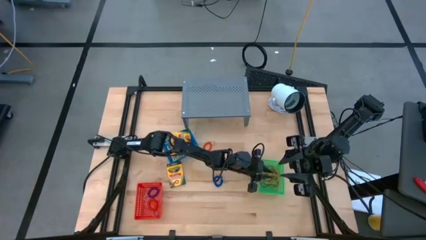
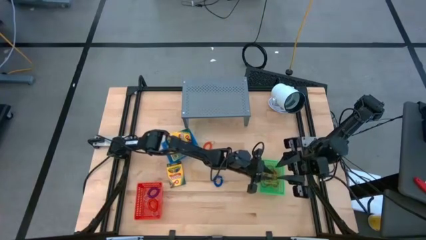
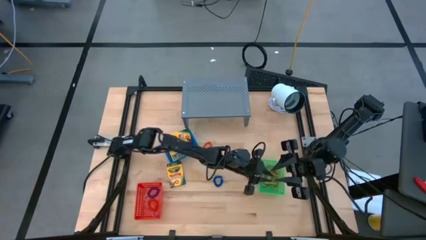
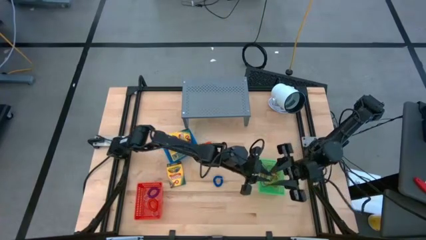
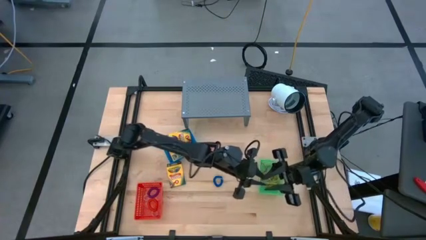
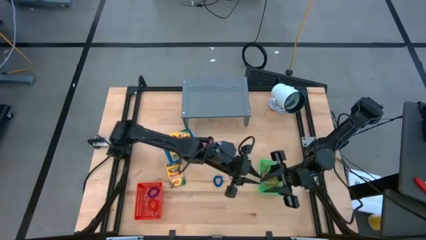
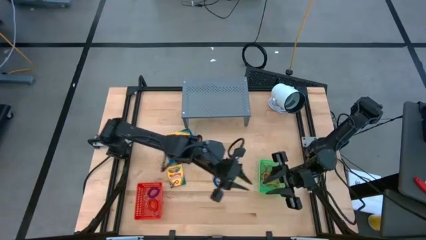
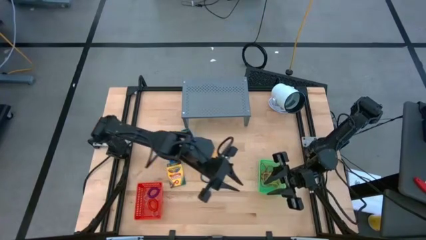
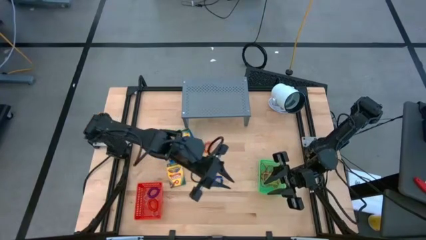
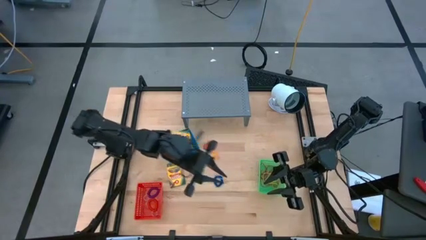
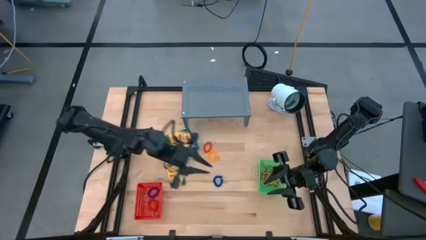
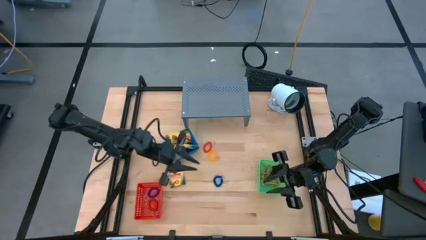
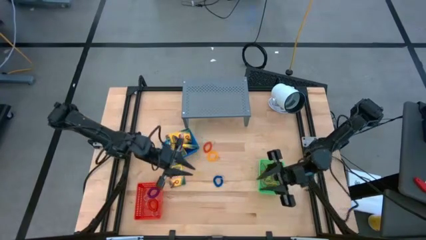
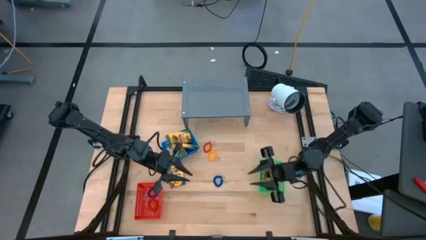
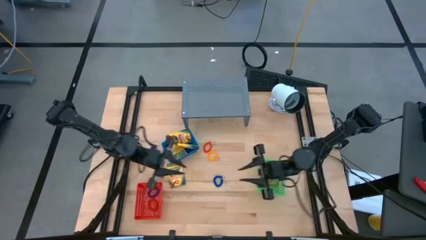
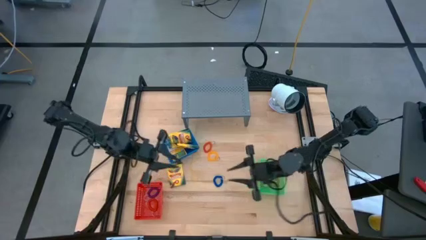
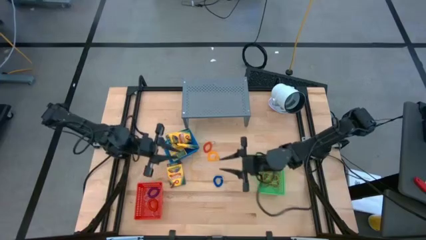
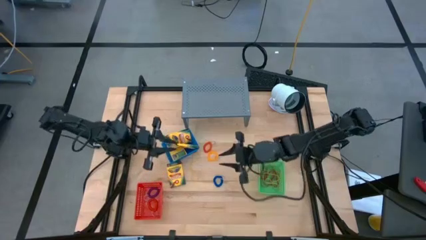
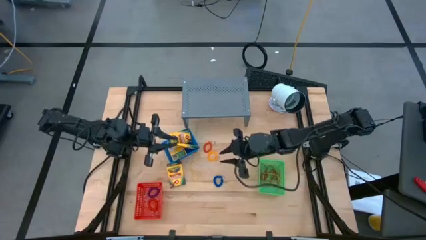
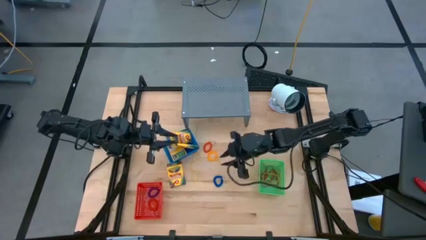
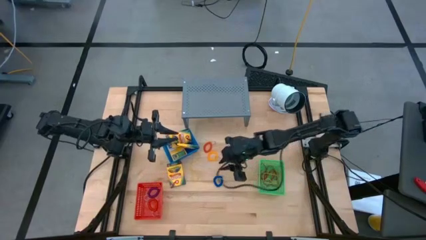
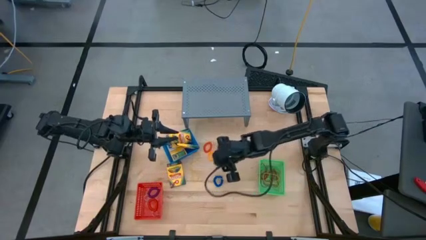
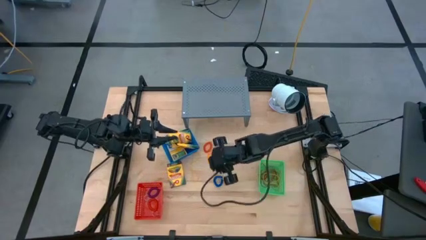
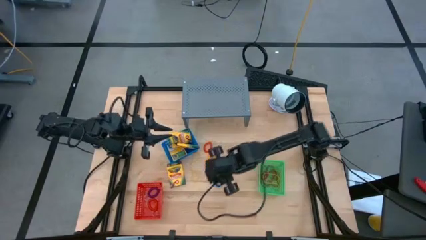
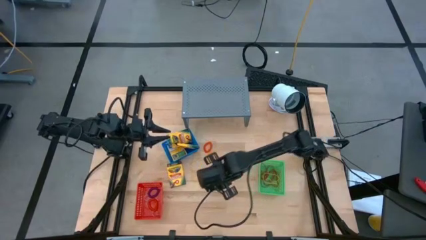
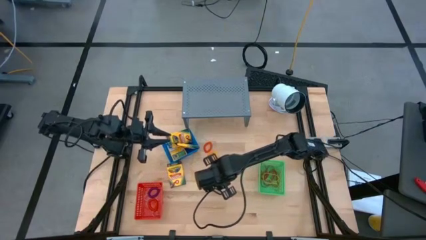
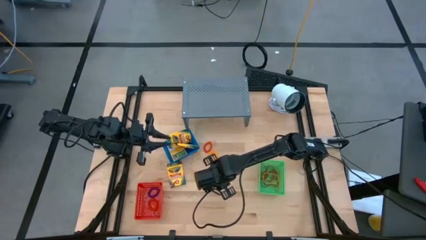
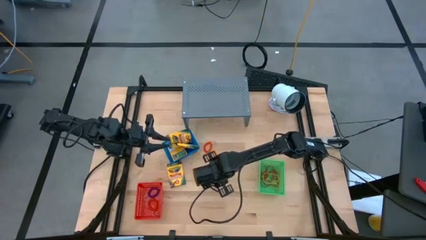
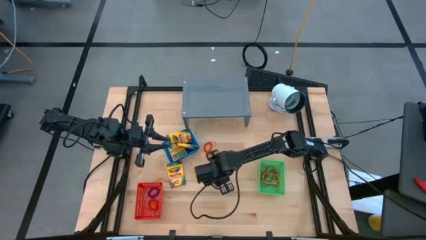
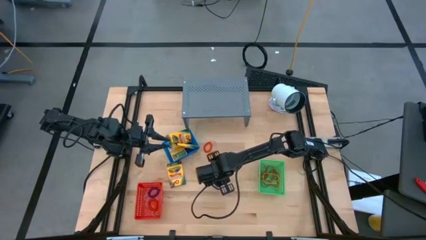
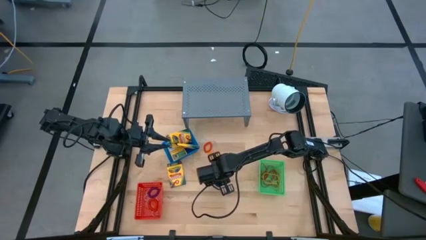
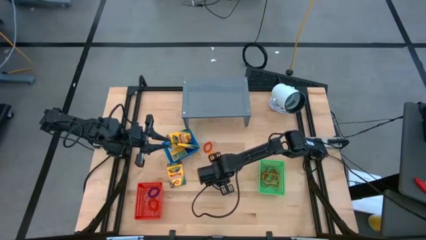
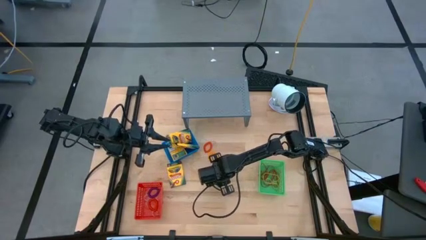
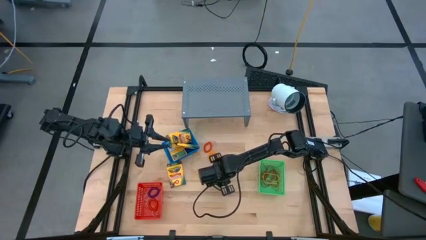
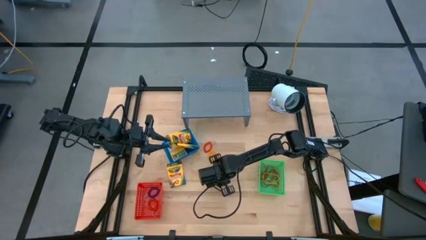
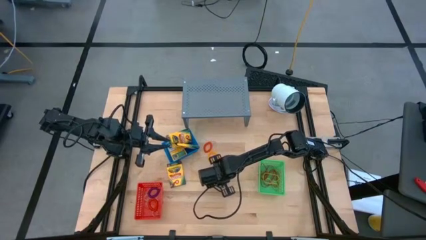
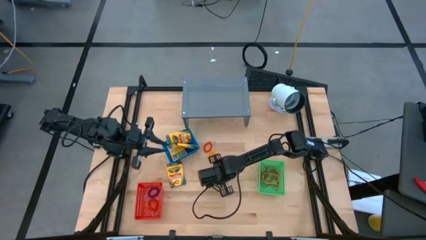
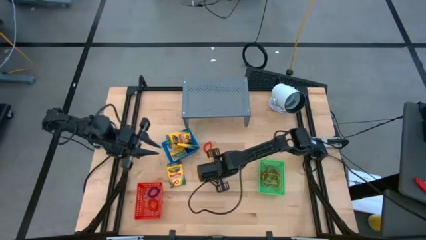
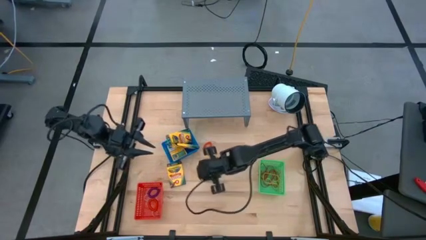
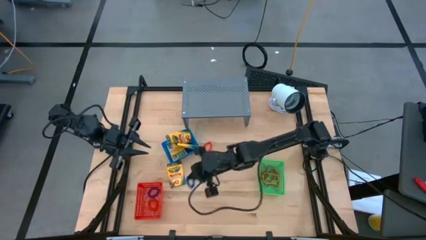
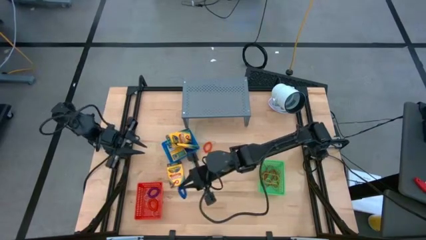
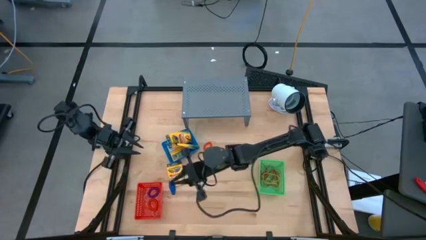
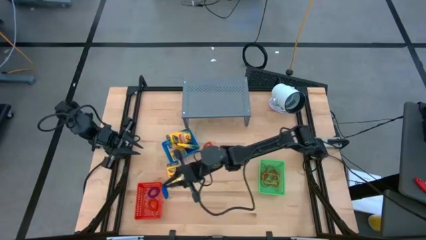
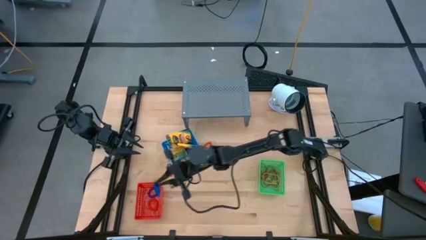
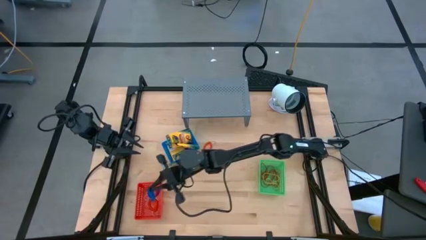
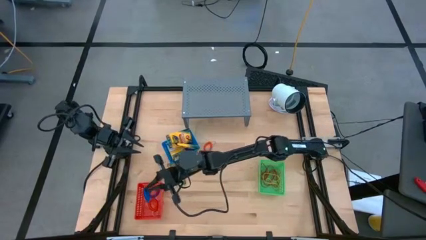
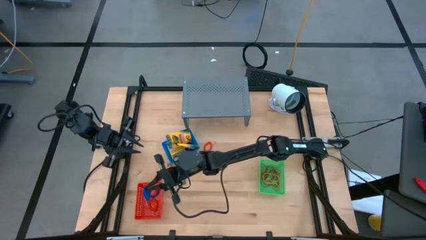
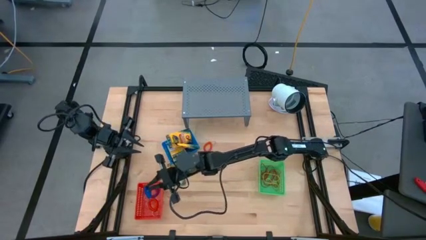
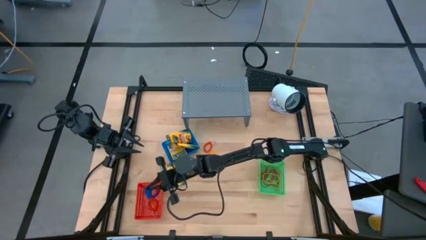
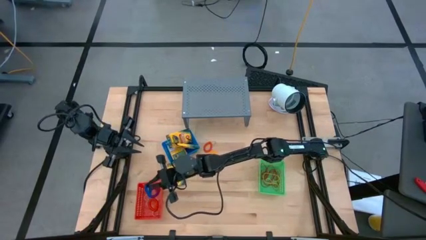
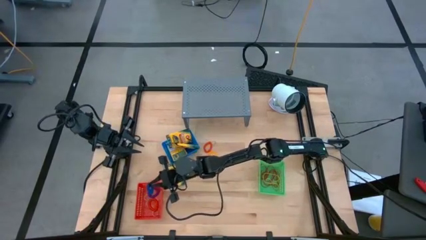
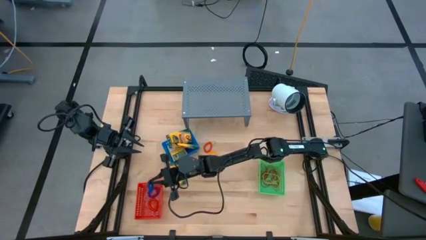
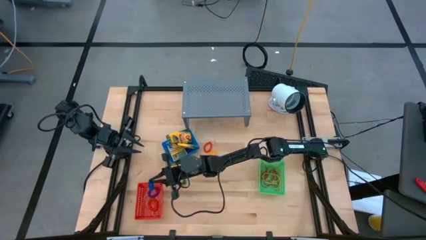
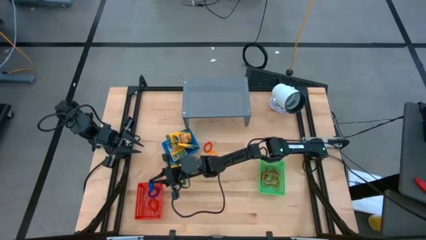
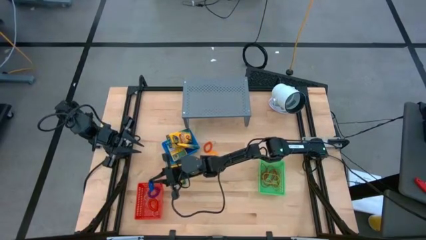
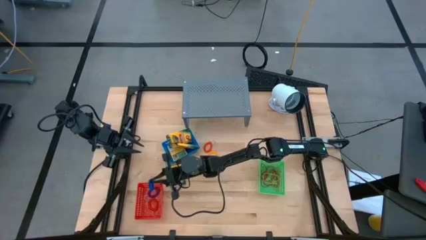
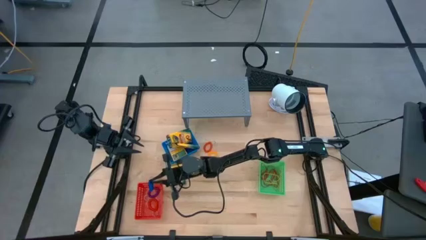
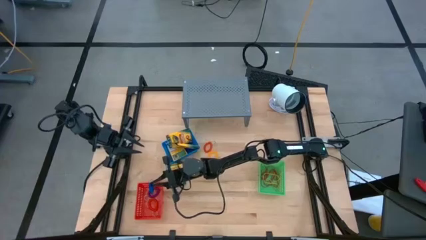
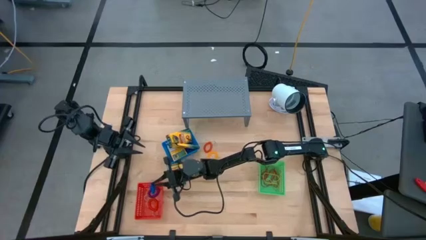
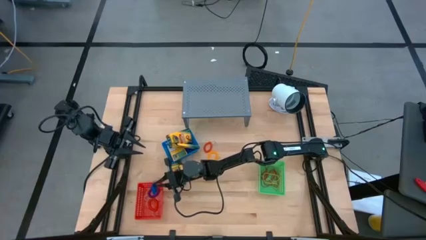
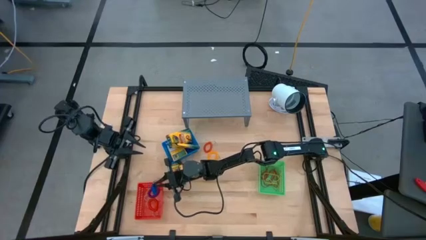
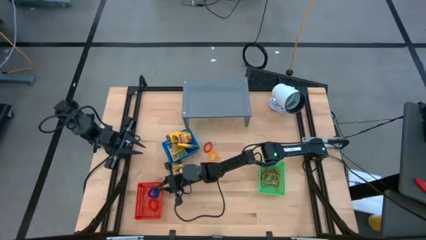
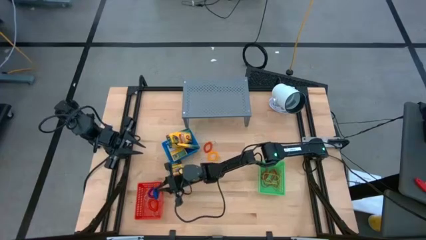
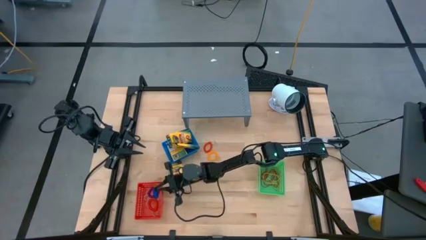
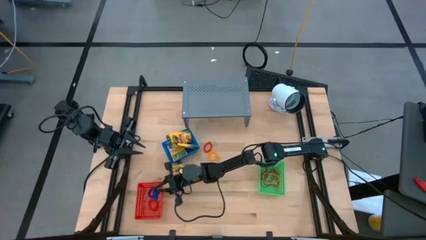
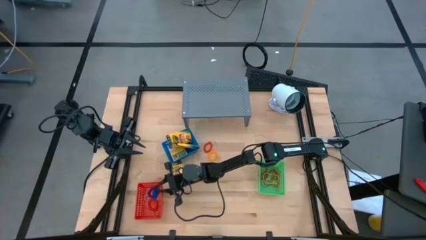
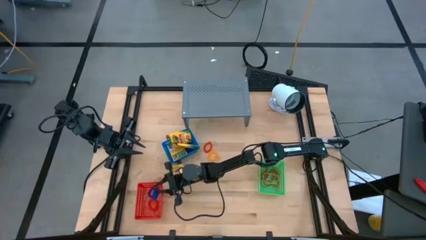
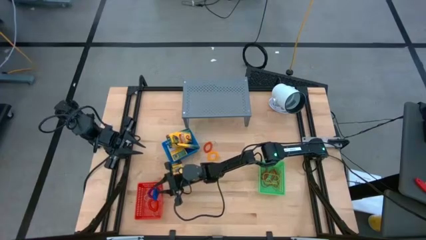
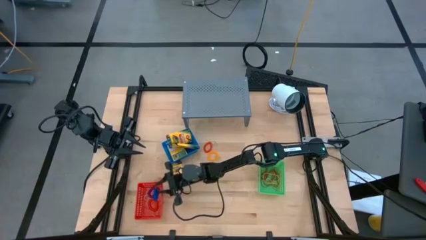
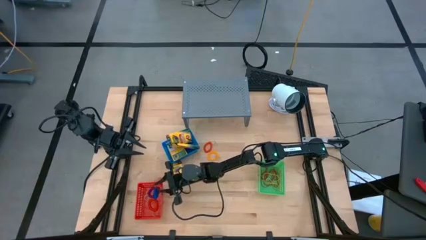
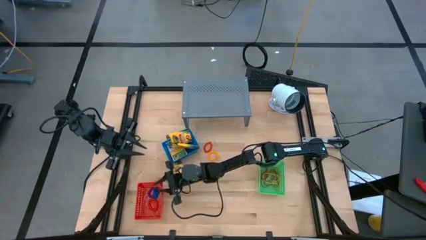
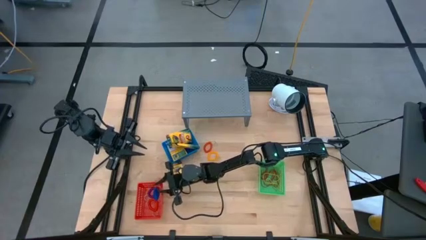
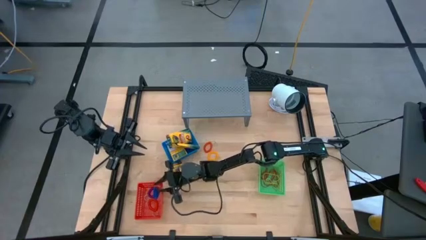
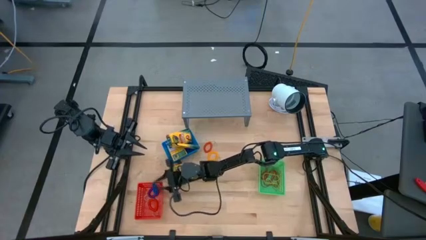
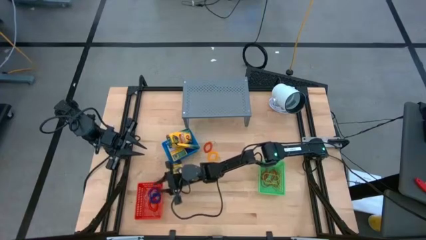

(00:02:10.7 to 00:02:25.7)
Task: Pick & Place Office Desk Supplies
Put the blue spiral keychain into the red bin
